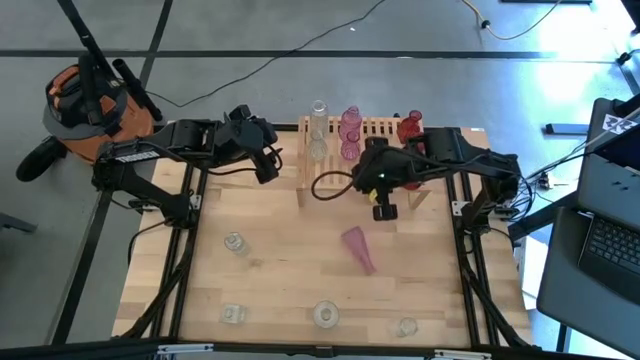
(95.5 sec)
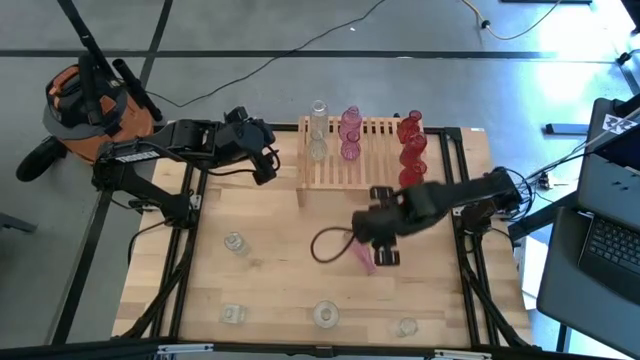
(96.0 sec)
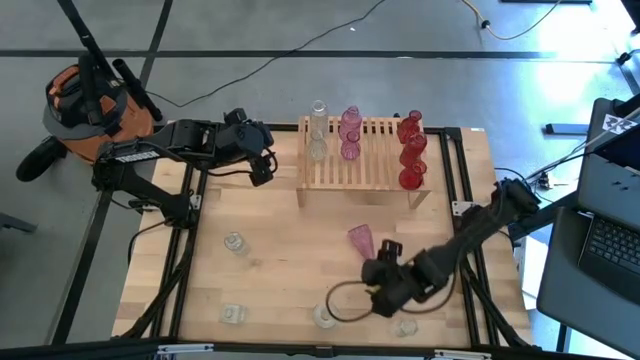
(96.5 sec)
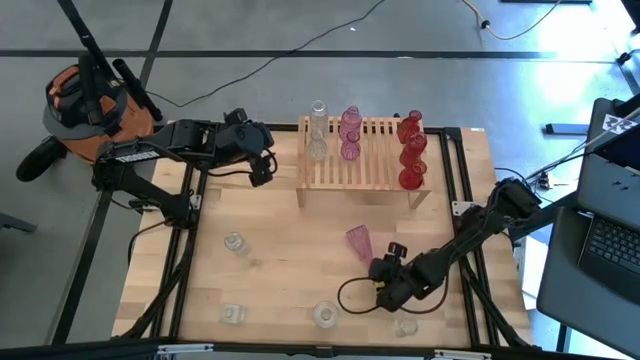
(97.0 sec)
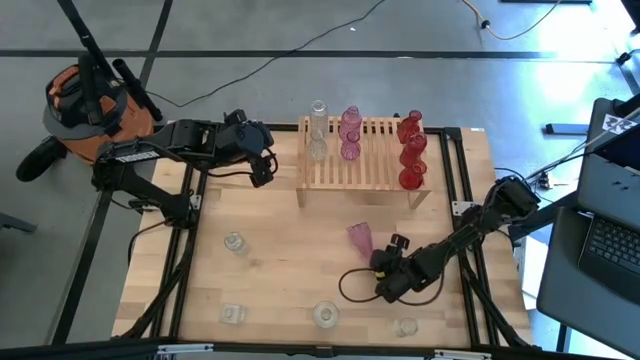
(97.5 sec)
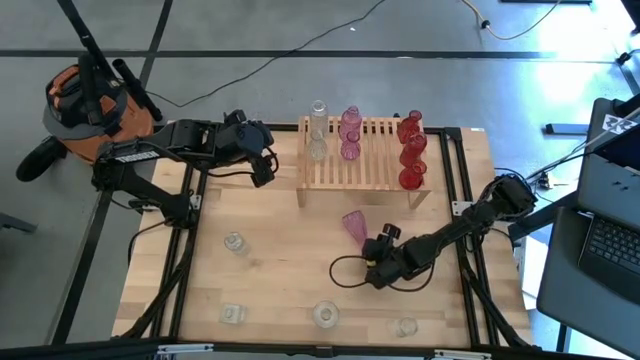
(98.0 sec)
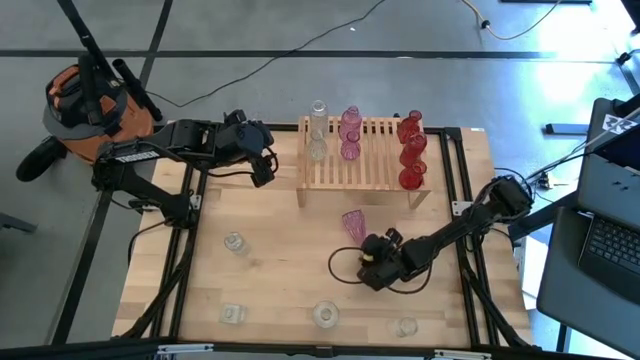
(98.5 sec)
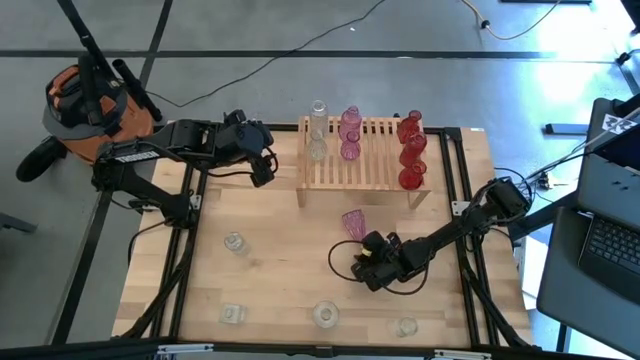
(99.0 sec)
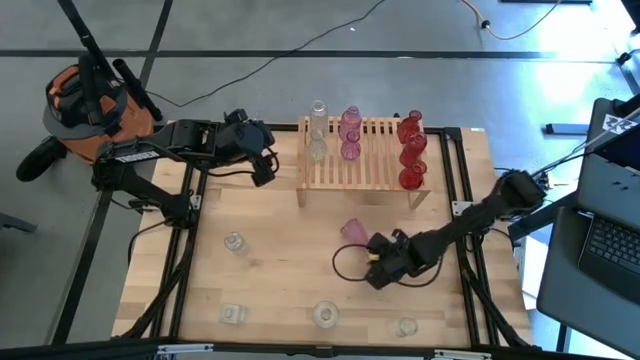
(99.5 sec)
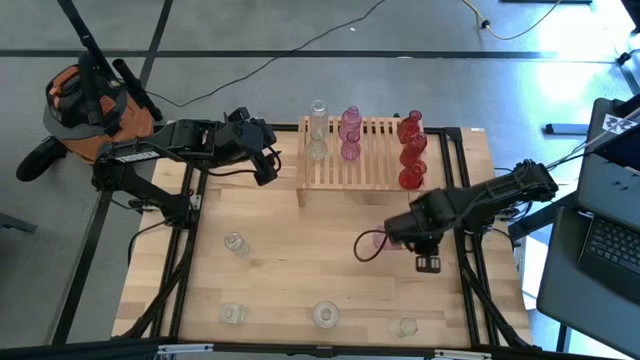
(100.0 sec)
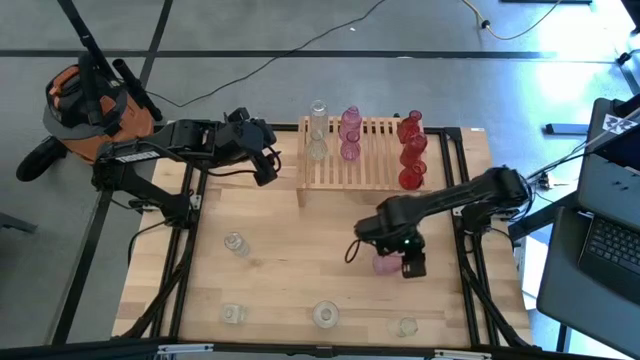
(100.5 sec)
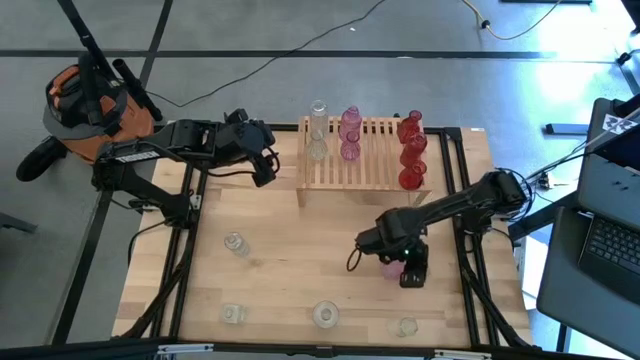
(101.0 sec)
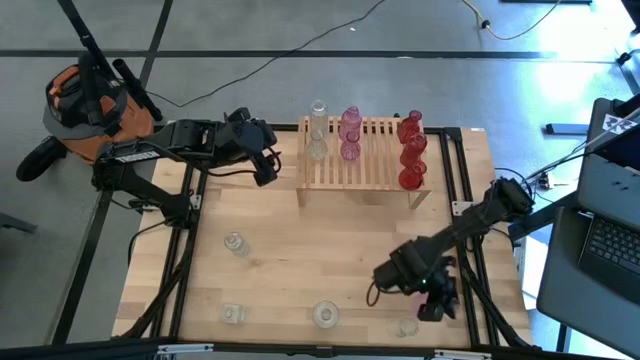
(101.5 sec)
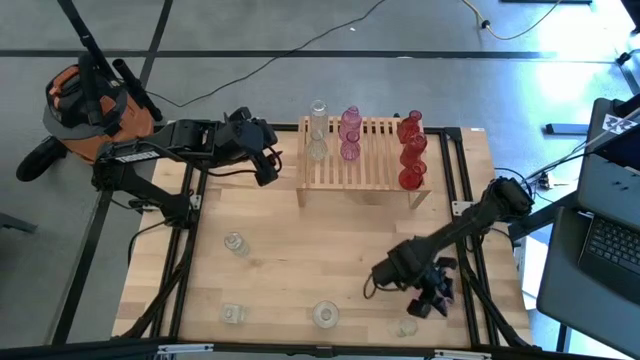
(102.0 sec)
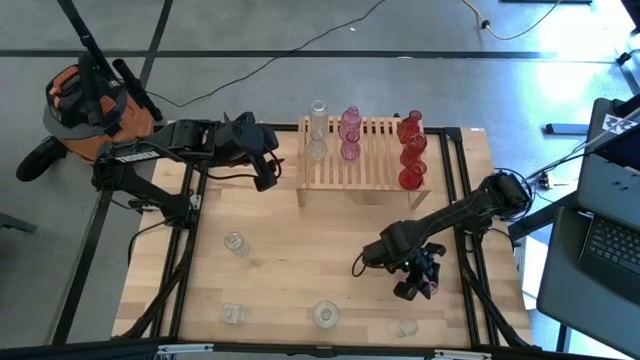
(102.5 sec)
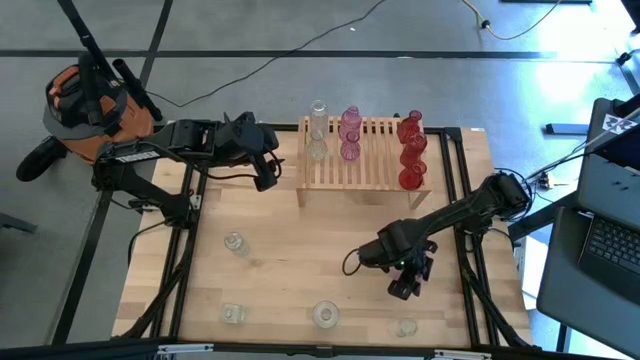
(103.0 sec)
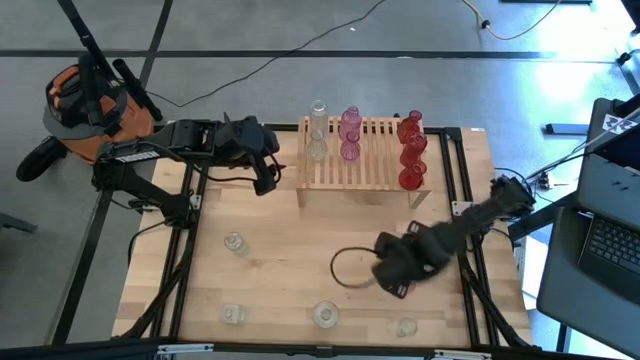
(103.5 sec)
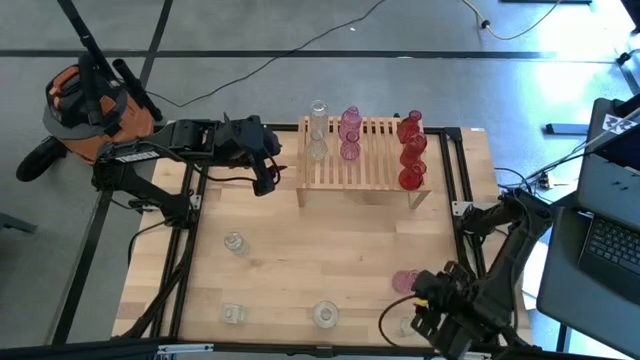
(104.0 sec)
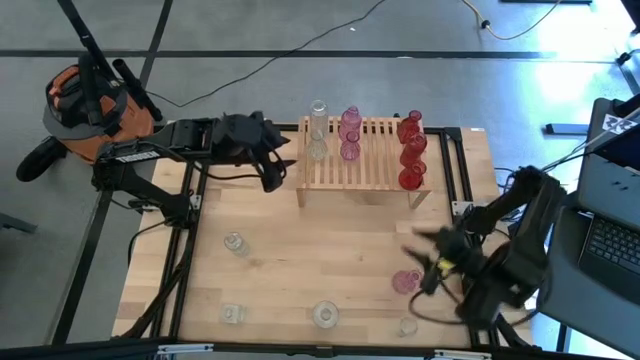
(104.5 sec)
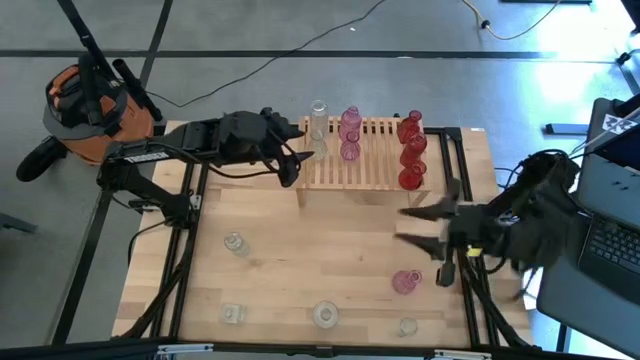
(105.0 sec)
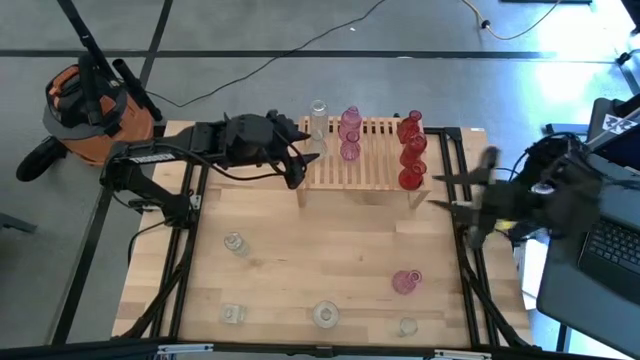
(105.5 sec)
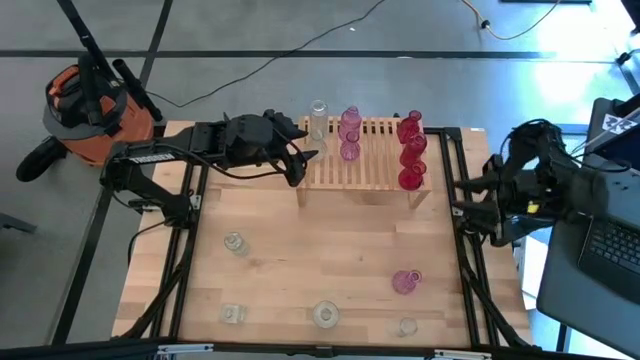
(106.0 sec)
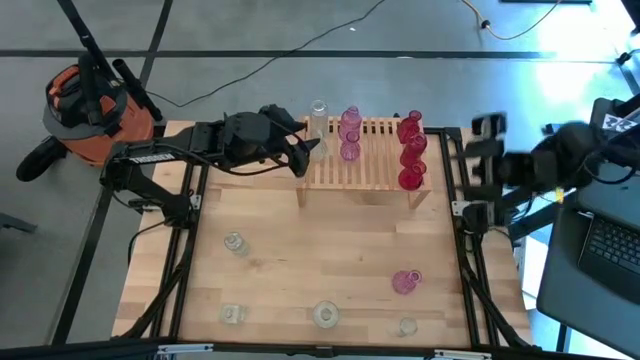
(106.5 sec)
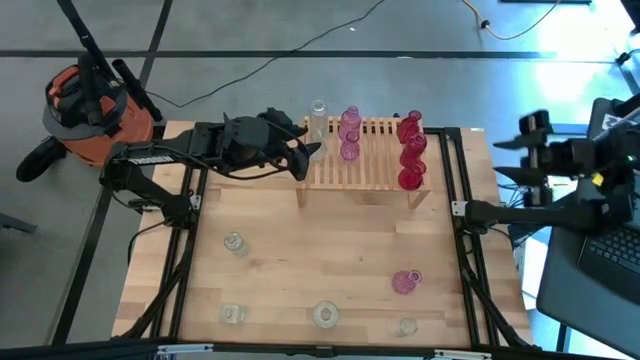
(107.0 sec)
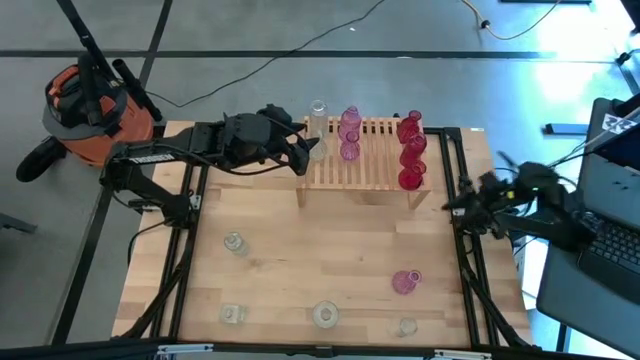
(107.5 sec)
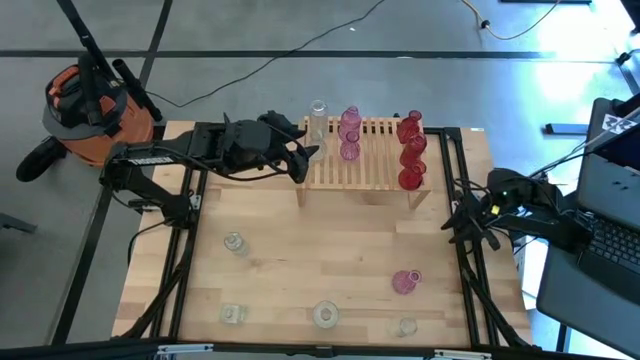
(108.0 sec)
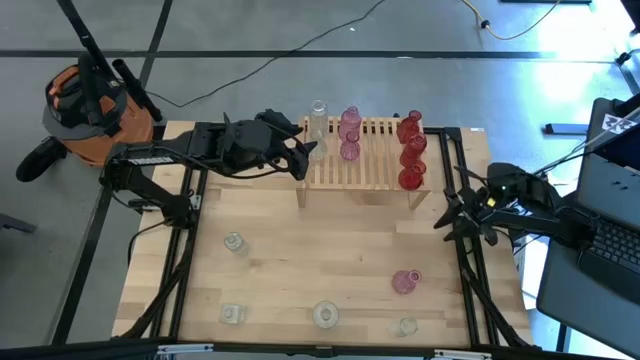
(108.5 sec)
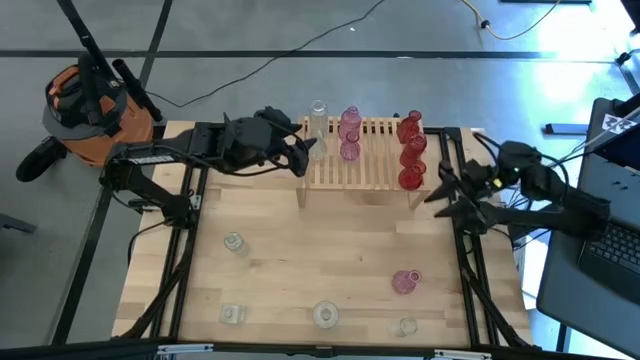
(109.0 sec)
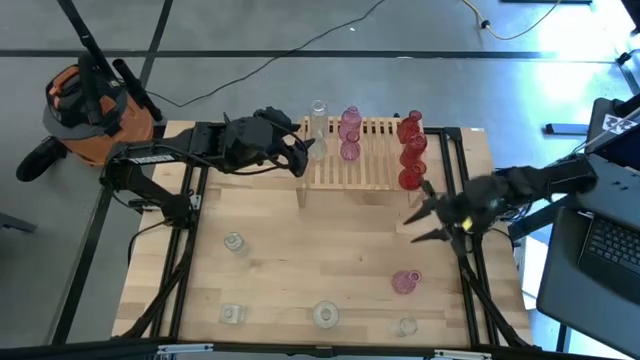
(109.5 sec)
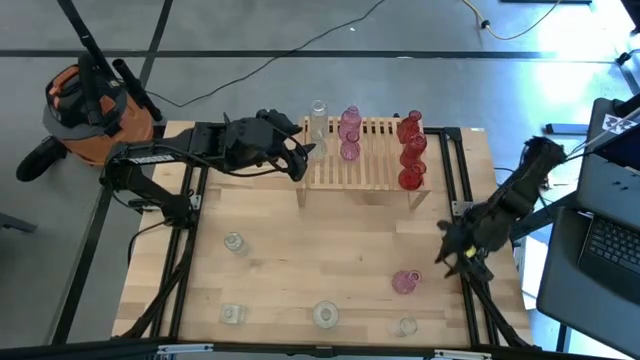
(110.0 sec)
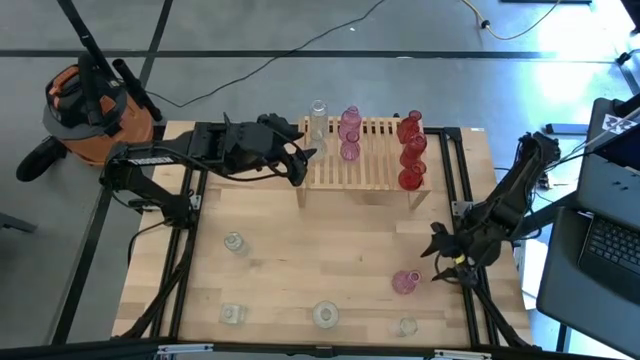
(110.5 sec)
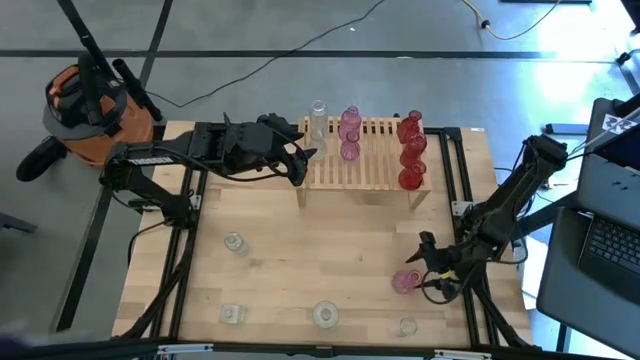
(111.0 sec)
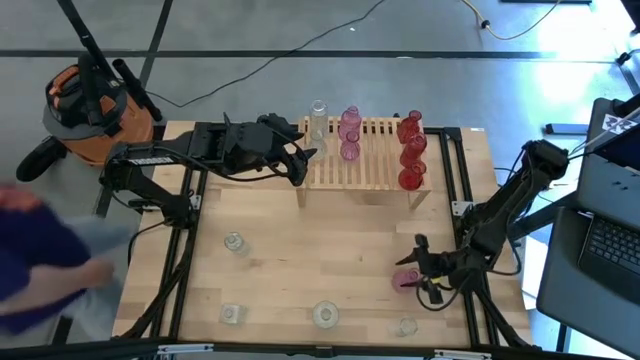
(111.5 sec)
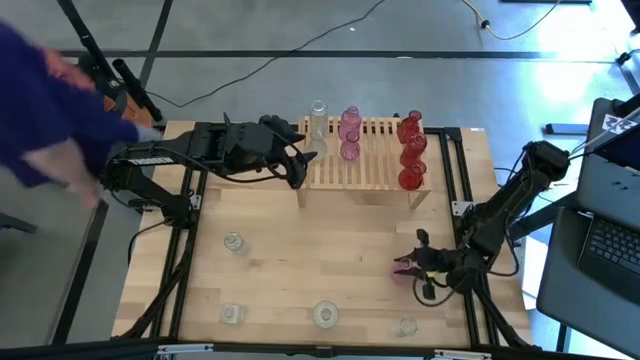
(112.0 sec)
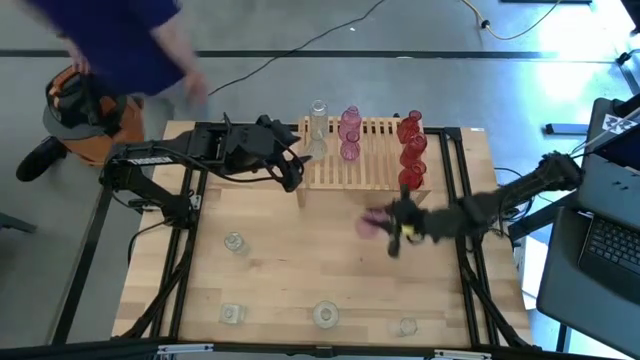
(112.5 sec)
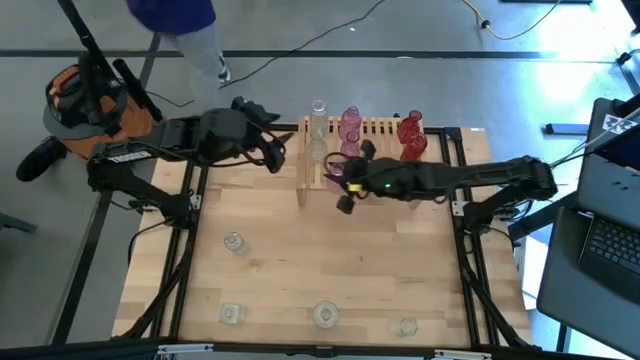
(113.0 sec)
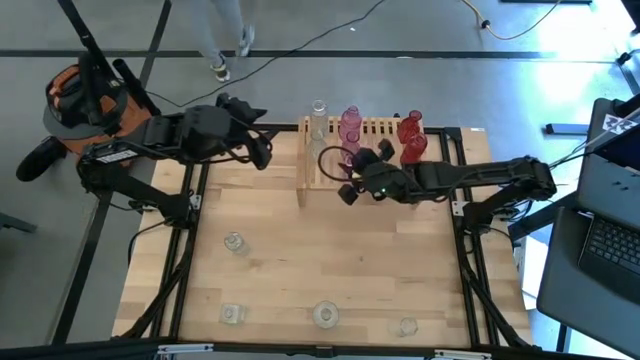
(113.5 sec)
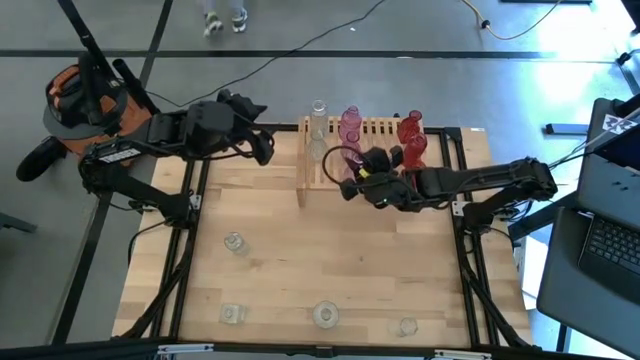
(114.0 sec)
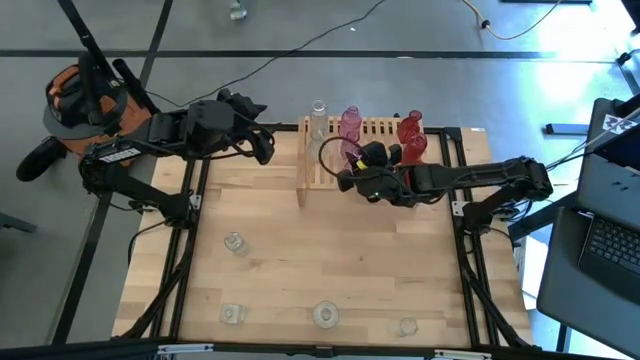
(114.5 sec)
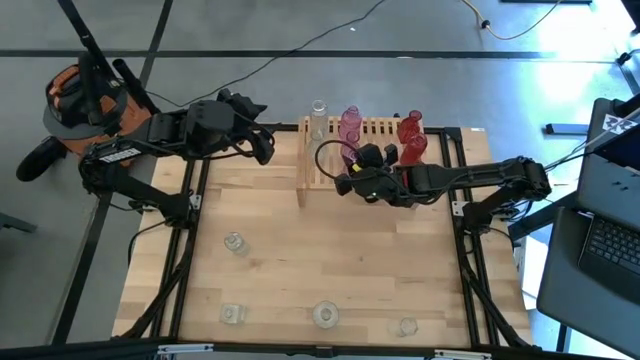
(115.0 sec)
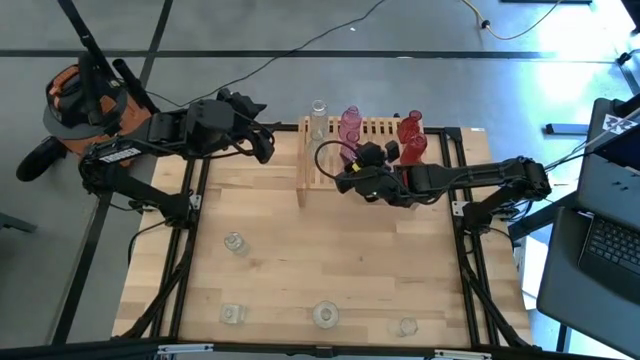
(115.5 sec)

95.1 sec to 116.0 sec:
Task: sort vases onto shelf
Put the pink vase on the shelf aligned with the other pink vase

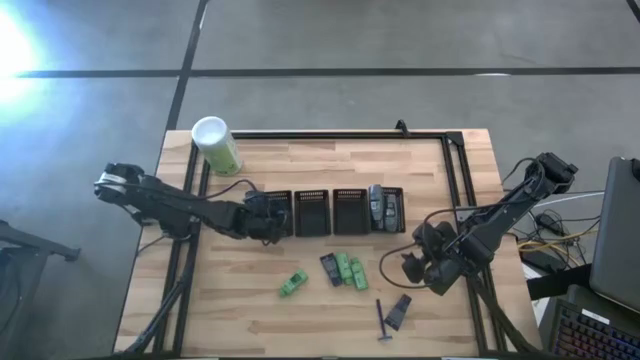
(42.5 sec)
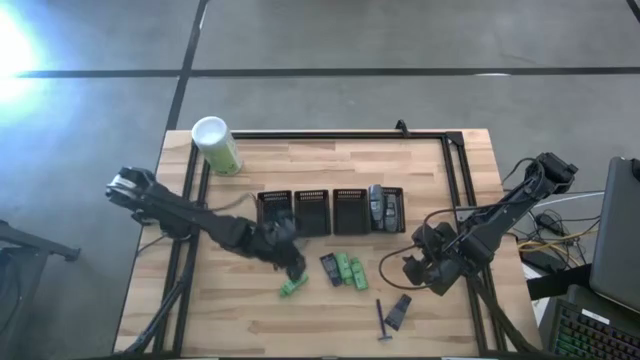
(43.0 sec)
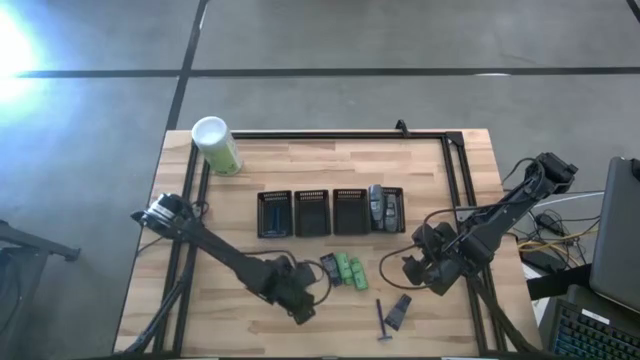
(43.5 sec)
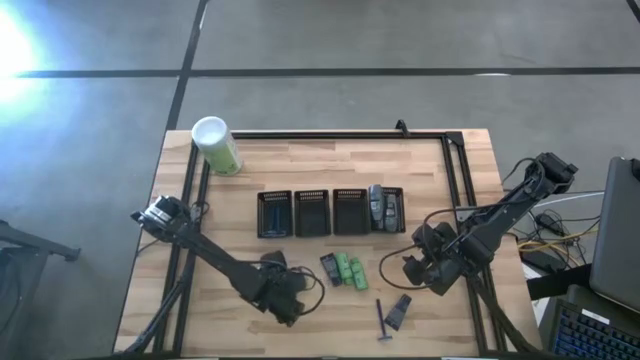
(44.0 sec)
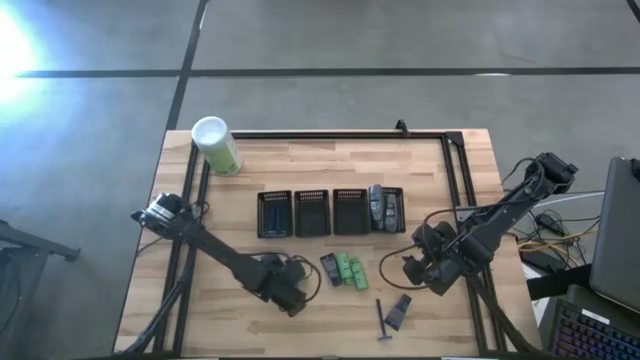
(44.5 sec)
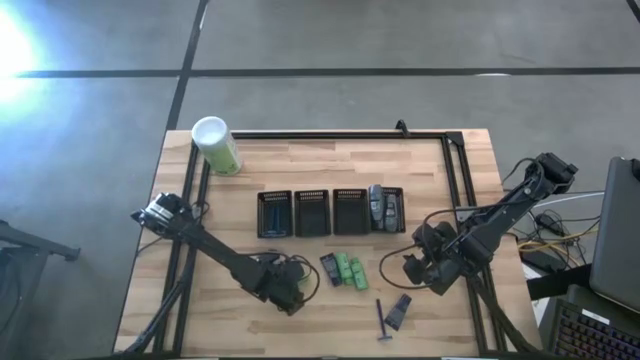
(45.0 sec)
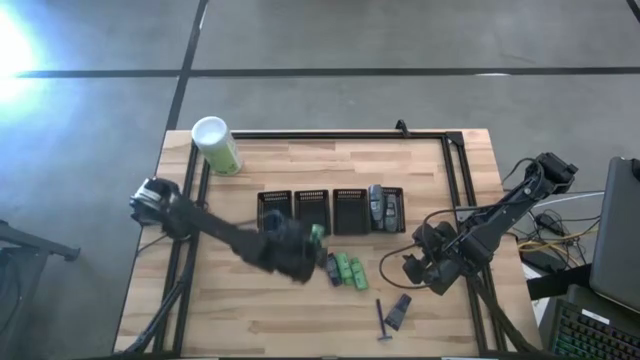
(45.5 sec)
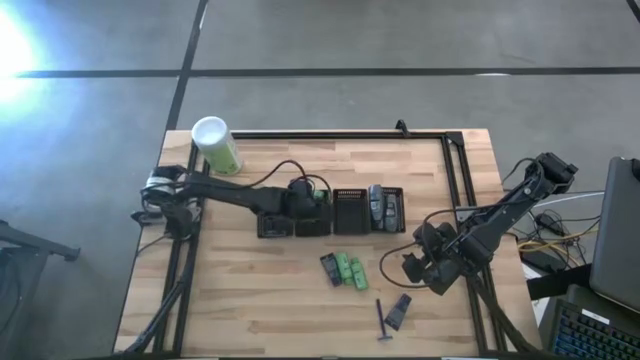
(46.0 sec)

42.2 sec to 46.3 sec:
Task: Pick & Place Travel size toiletries
Put the green shampoo into the middle left black basket
